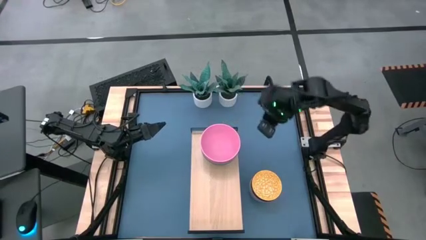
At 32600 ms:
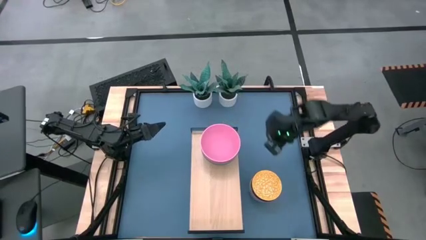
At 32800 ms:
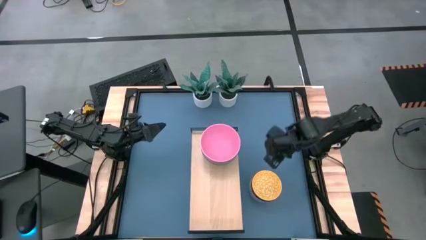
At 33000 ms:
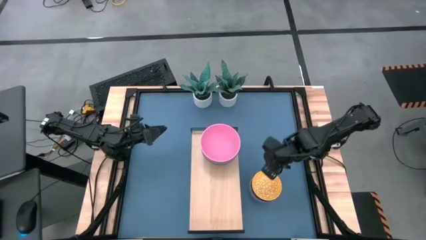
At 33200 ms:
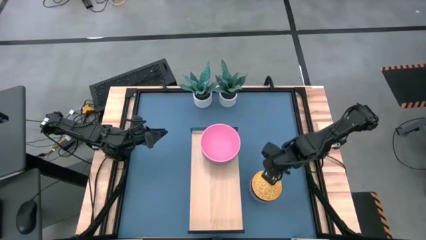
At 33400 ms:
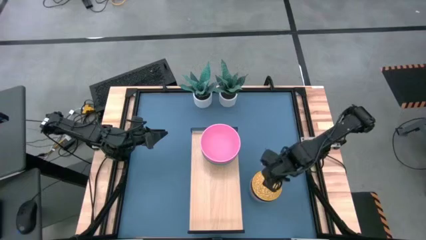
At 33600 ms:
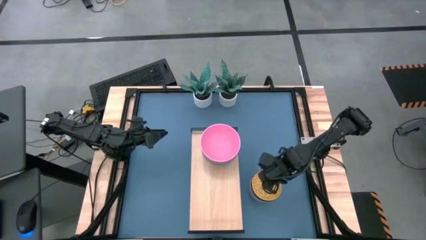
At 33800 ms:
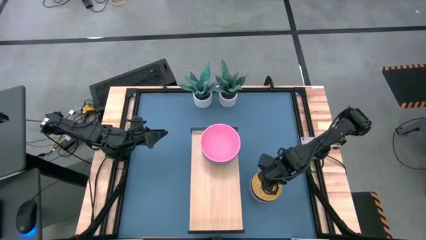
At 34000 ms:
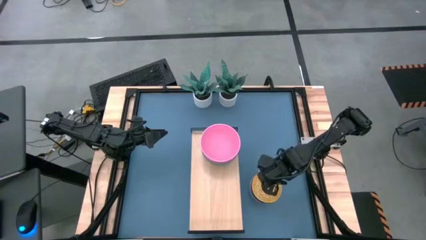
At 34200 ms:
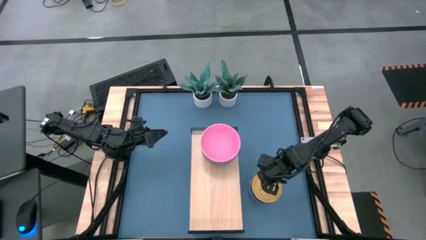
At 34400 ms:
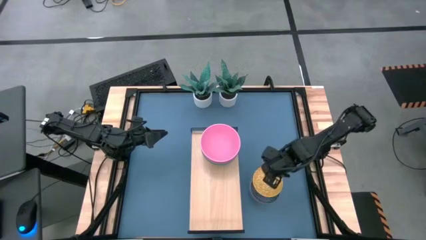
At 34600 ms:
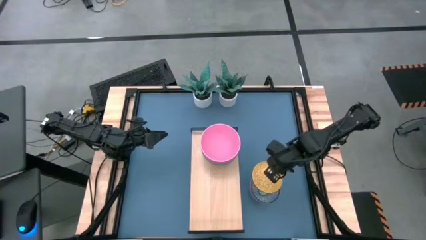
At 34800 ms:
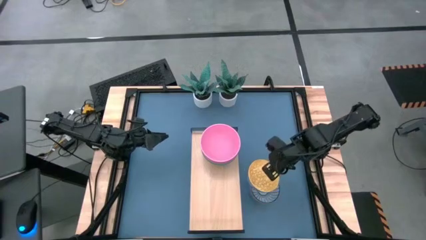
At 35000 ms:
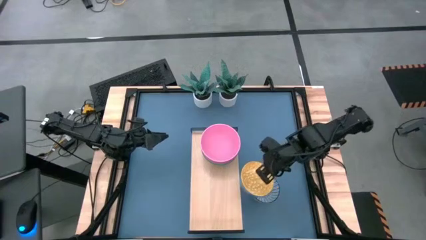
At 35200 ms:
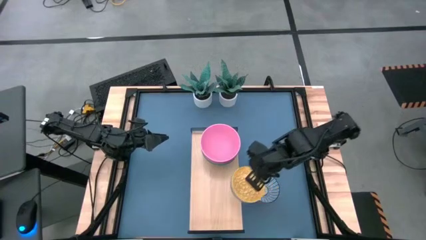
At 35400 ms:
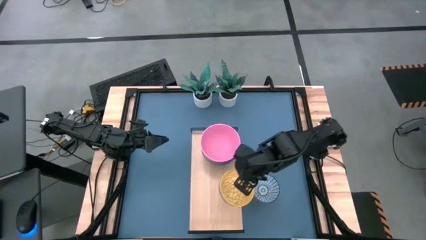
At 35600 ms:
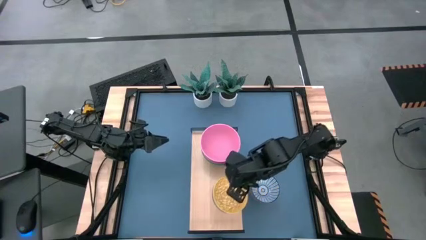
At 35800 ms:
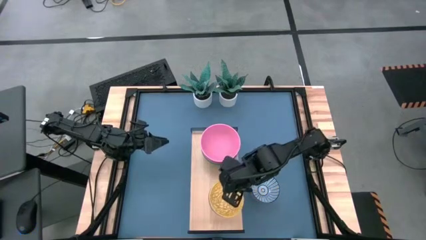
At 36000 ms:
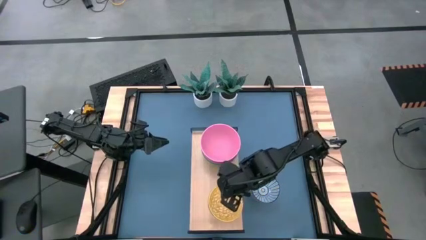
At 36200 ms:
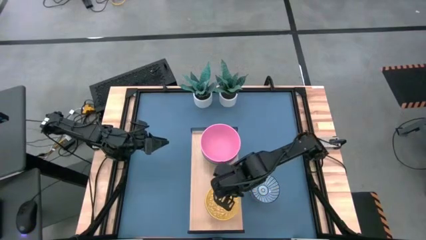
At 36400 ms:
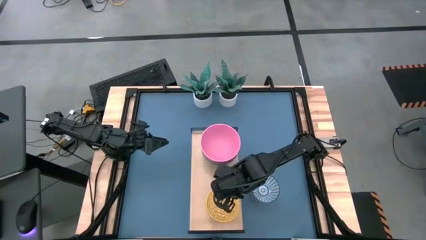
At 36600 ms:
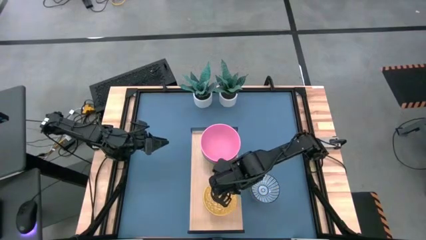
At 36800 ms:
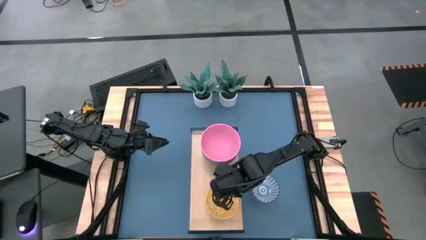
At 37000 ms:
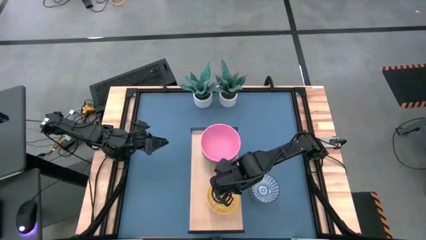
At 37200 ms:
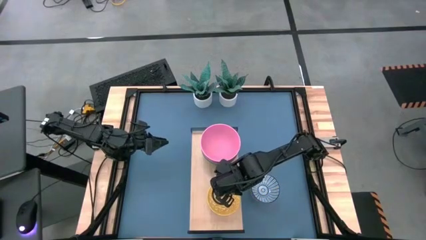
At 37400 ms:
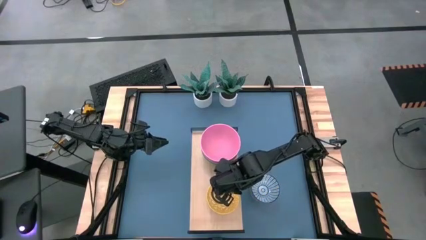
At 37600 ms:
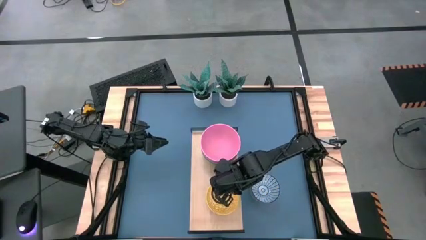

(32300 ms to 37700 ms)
Task: Place and stack bowls onto a shelf
Put the yellow patterned bowl on the shelf

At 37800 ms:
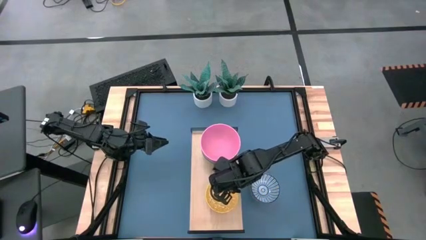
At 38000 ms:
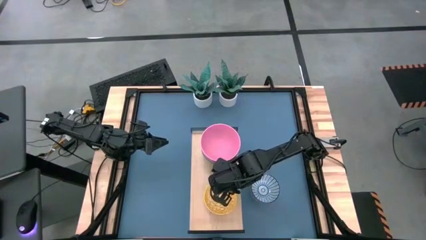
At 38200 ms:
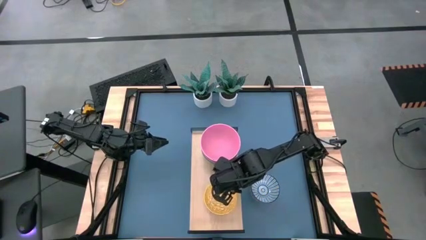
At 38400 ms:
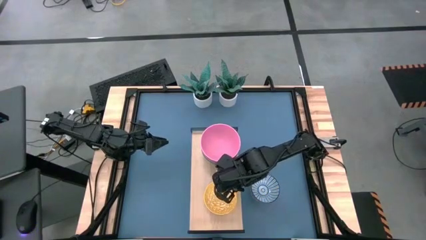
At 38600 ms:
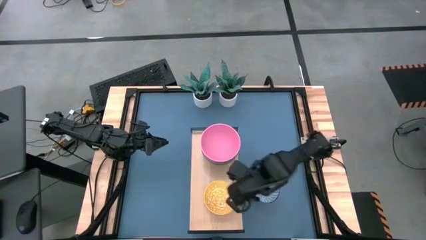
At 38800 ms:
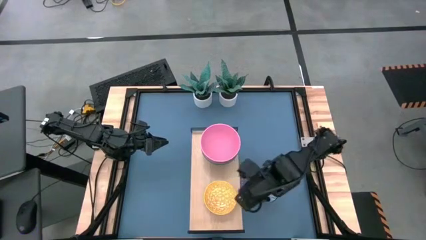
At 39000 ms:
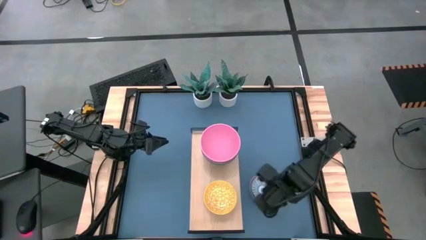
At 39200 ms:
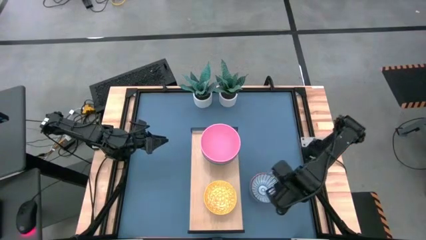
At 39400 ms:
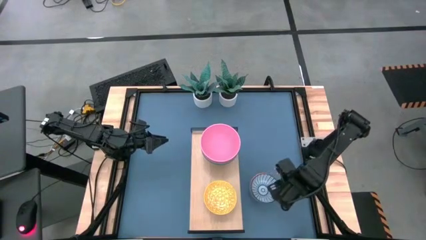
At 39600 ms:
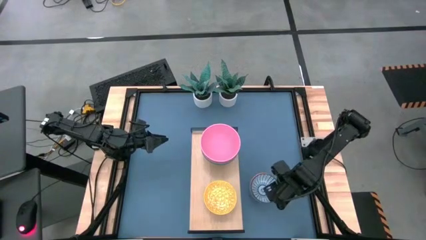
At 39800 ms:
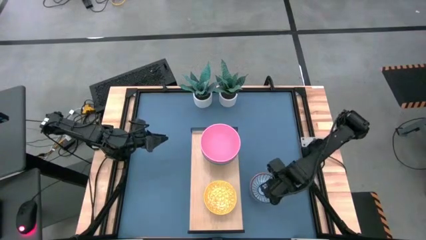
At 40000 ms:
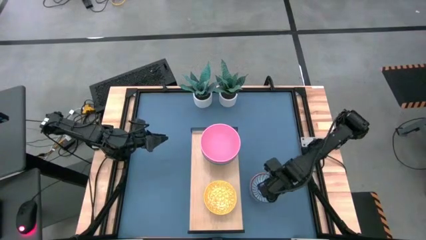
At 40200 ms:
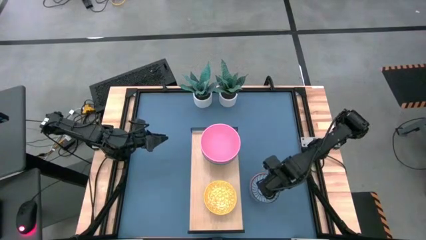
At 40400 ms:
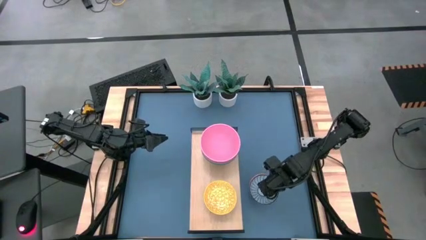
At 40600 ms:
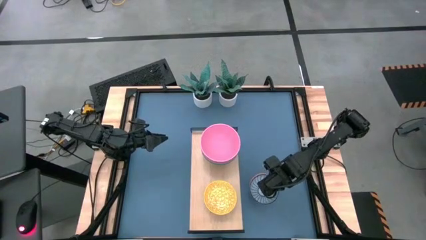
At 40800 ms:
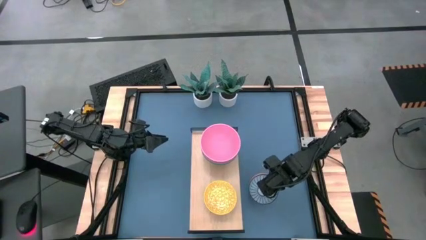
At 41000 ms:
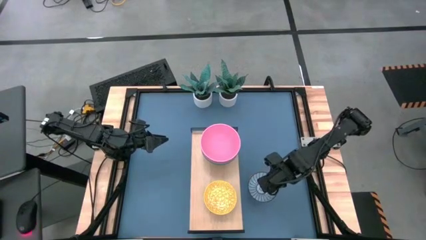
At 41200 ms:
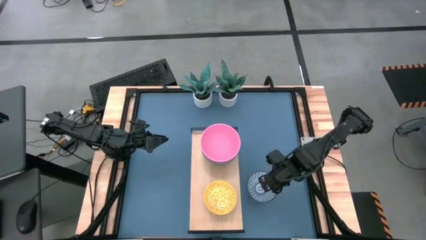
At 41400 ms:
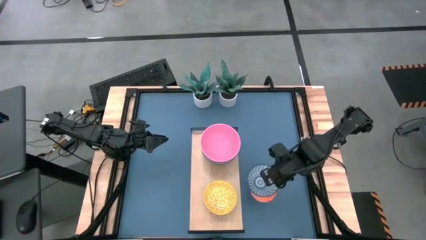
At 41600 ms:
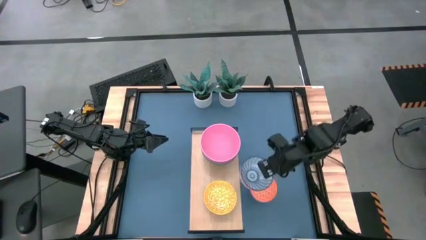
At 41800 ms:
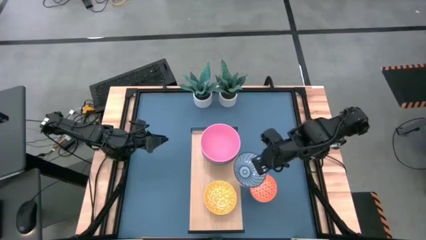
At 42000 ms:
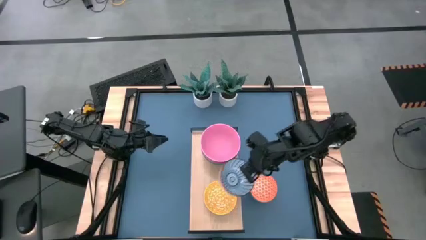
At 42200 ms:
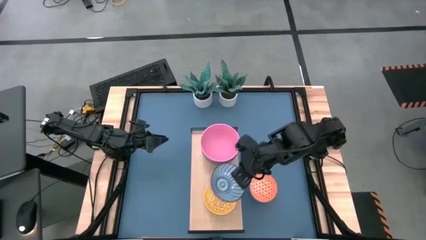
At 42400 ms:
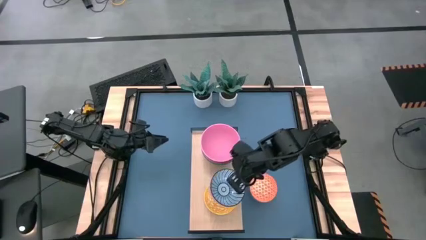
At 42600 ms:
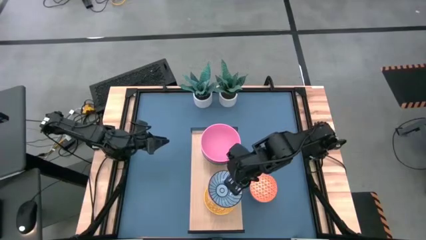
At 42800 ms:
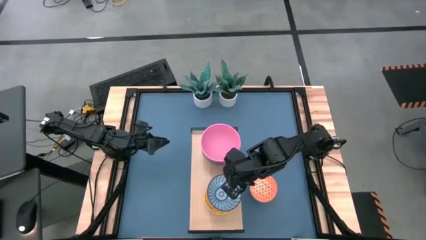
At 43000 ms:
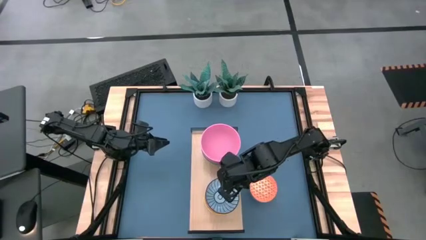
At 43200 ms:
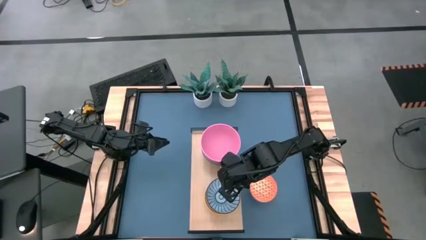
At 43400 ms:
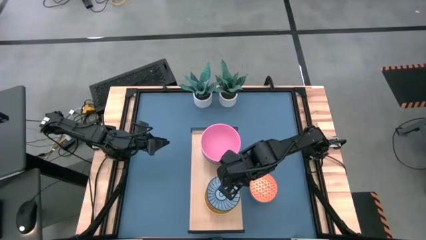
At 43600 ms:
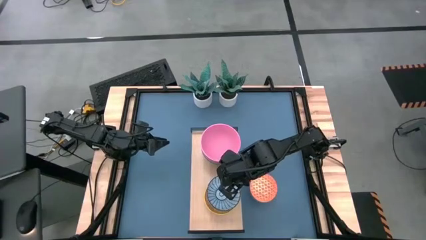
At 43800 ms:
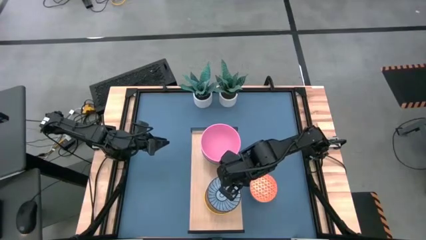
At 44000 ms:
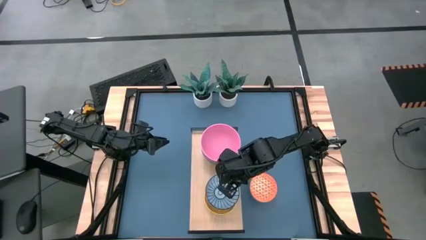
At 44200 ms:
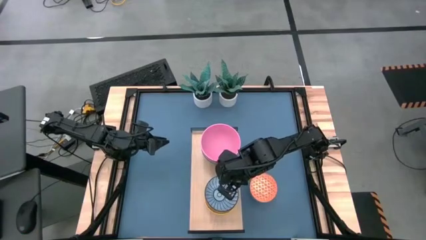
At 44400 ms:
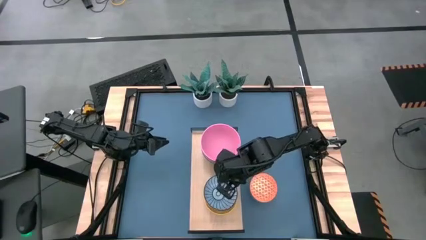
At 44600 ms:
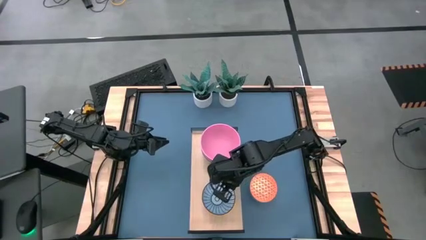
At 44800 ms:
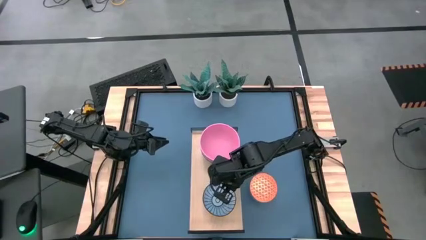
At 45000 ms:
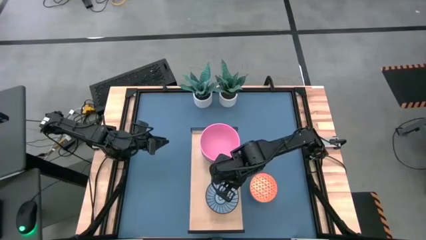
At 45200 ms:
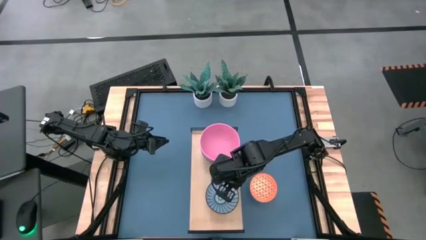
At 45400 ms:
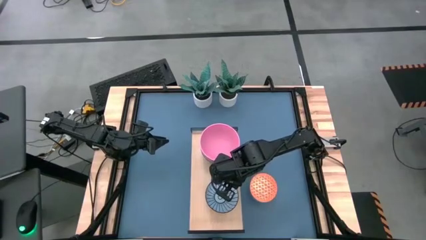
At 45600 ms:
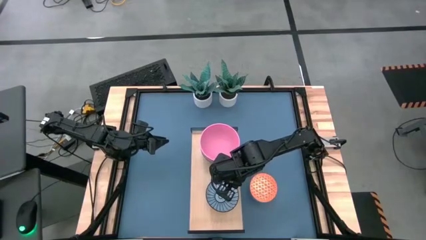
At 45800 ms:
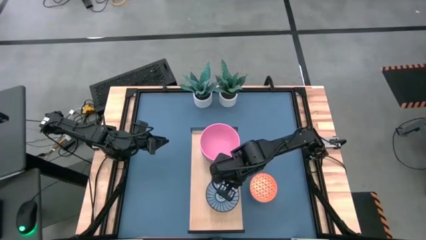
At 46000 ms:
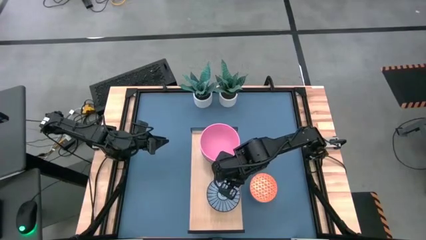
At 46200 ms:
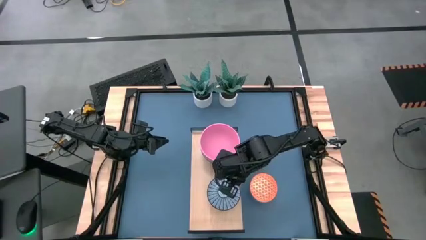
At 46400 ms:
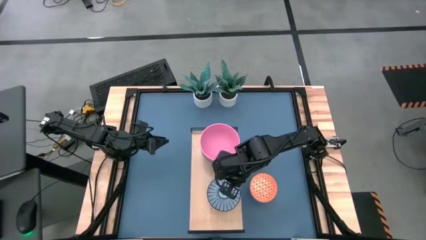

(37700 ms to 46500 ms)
Stack the blue patterned bowl on top of the yellow patterned bowl on the shelf

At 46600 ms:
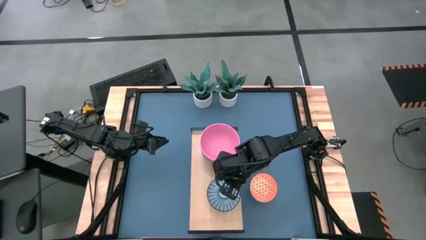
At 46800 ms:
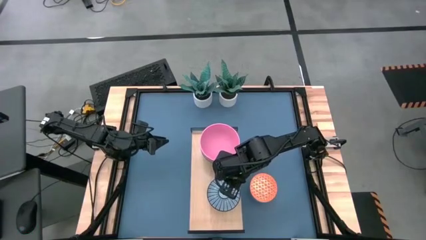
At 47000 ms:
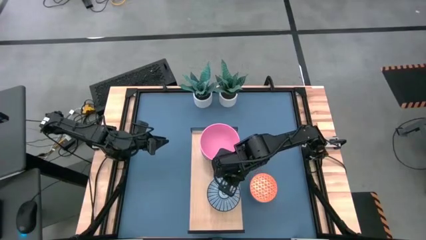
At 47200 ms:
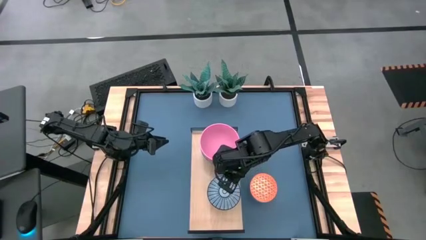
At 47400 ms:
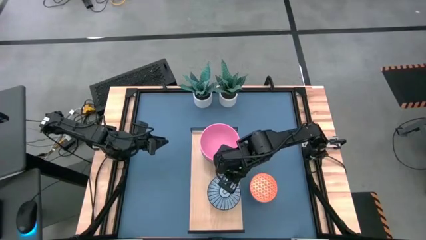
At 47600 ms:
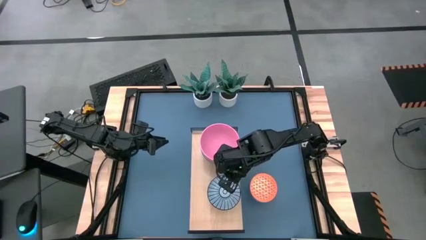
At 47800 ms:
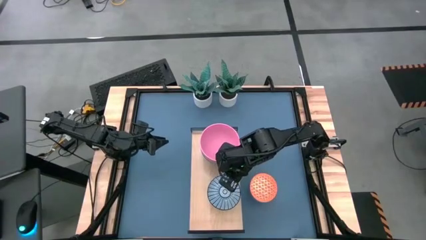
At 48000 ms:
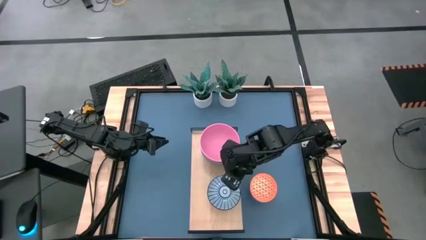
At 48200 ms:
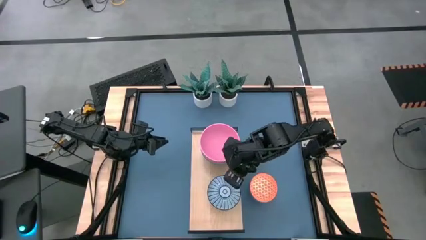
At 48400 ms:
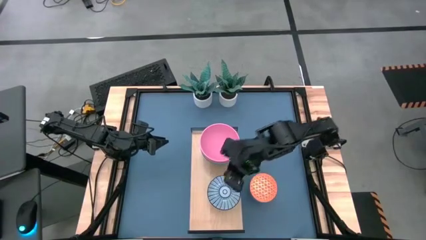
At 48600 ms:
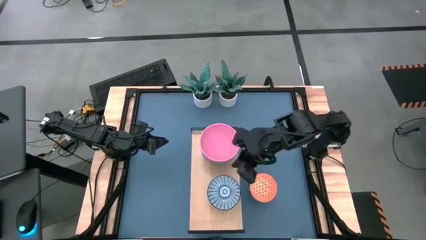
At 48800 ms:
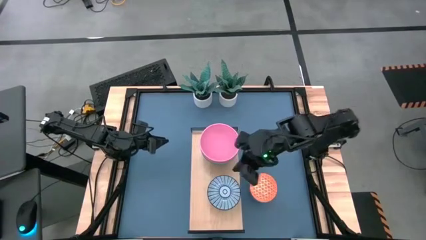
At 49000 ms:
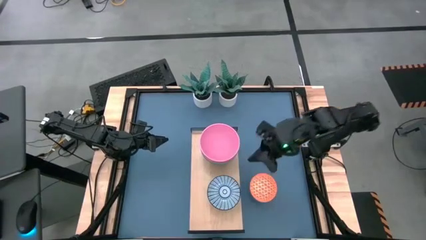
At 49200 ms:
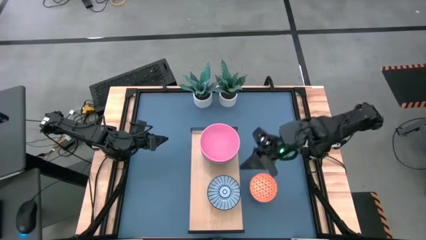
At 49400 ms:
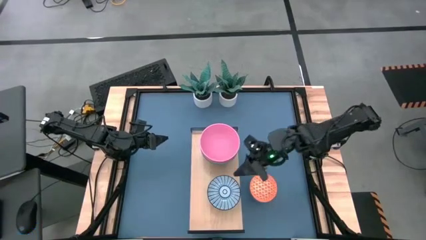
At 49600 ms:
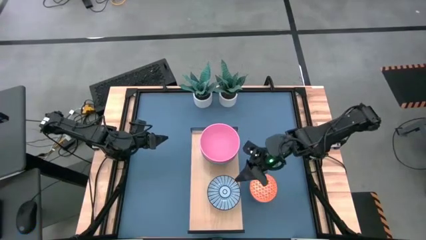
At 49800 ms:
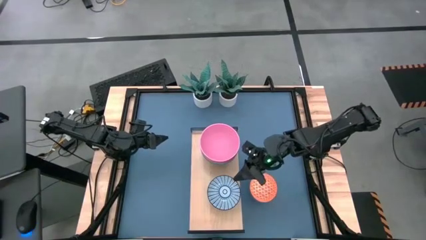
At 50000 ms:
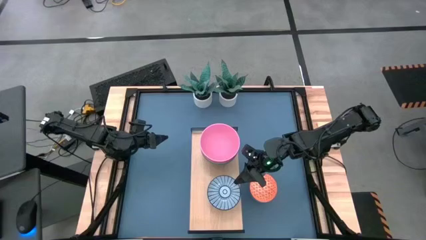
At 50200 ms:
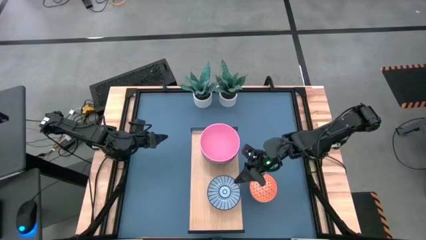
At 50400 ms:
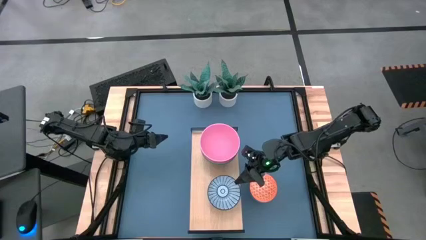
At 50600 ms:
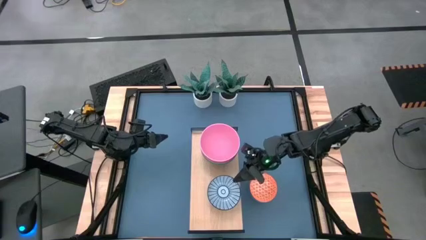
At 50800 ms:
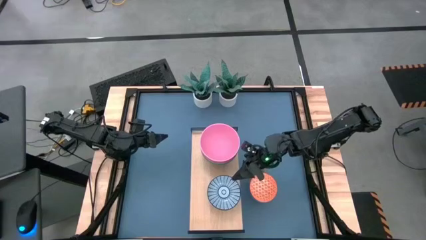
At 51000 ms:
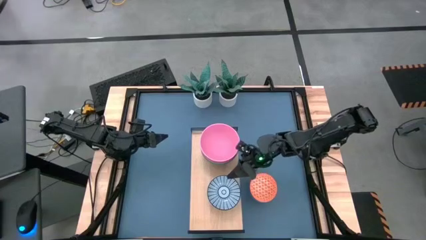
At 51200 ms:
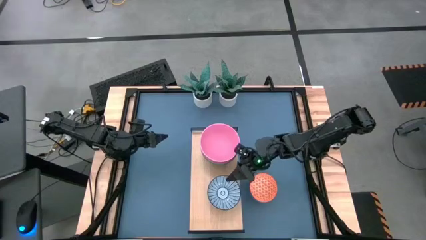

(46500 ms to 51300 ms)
Adjust the blue patterned bowl
